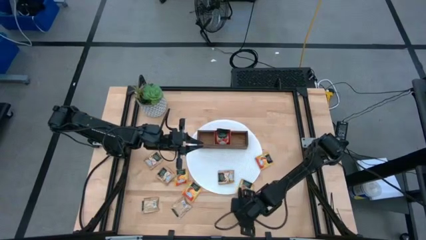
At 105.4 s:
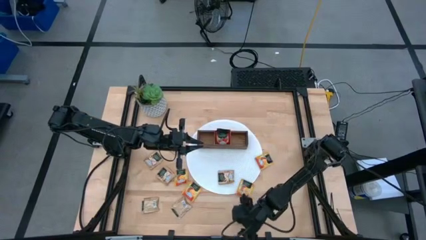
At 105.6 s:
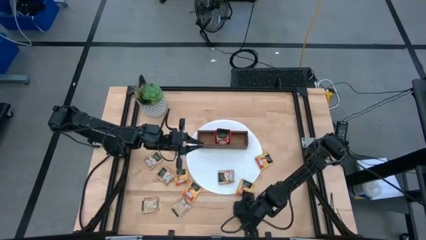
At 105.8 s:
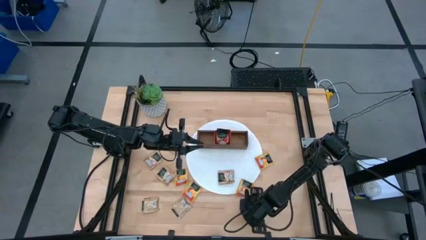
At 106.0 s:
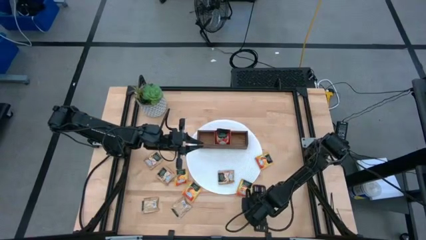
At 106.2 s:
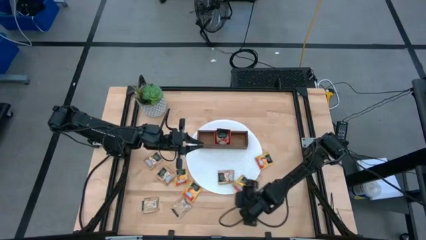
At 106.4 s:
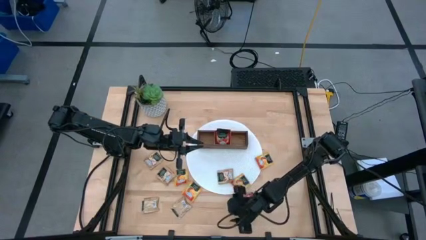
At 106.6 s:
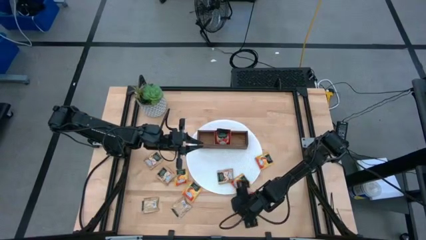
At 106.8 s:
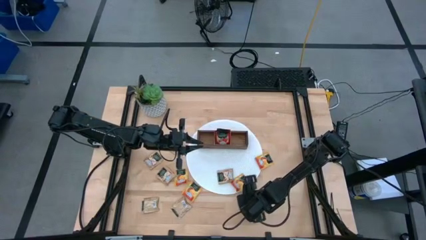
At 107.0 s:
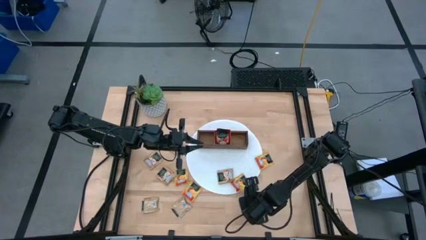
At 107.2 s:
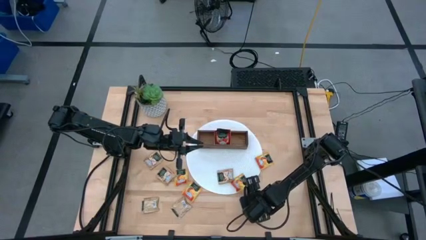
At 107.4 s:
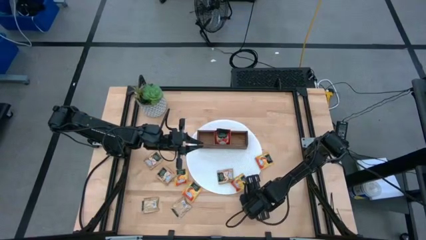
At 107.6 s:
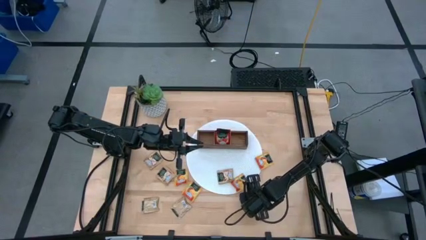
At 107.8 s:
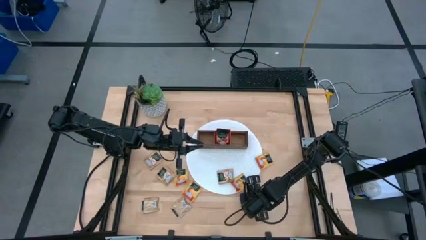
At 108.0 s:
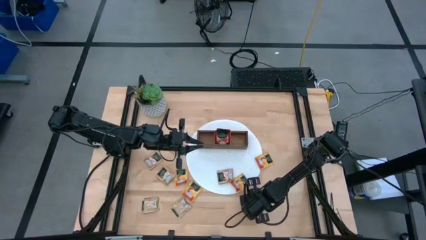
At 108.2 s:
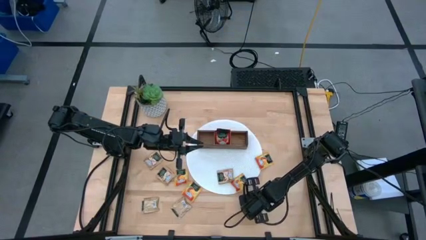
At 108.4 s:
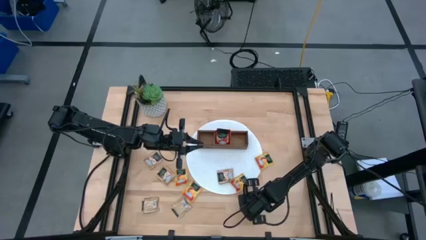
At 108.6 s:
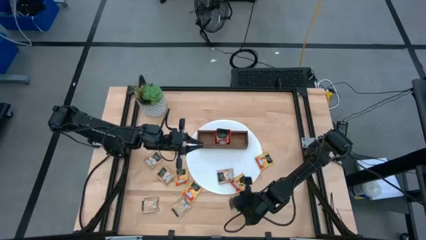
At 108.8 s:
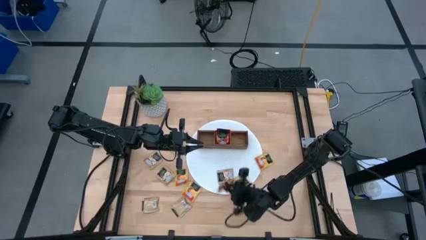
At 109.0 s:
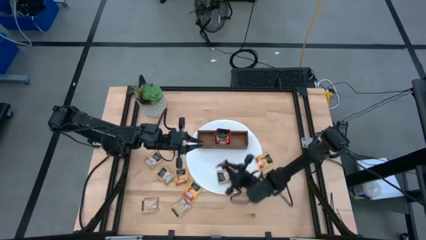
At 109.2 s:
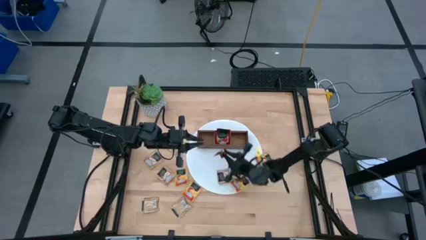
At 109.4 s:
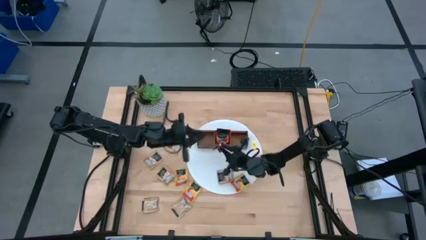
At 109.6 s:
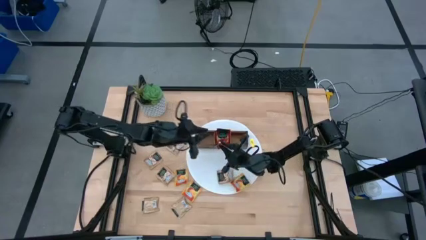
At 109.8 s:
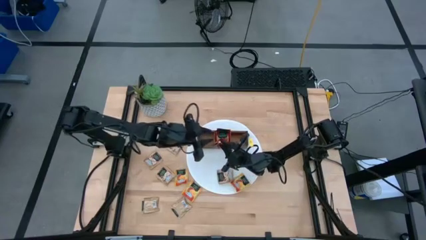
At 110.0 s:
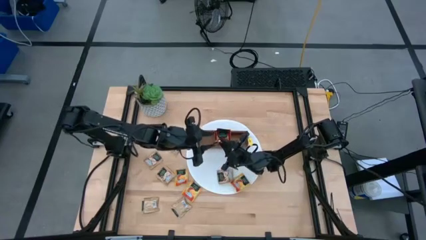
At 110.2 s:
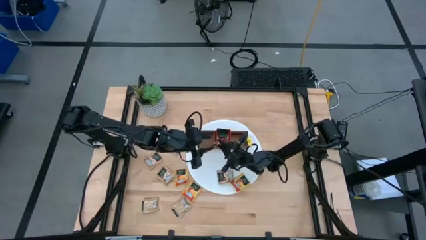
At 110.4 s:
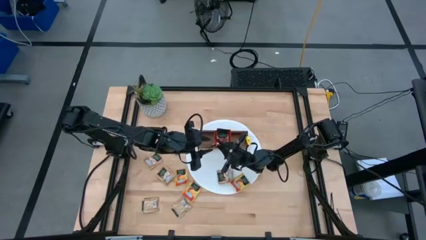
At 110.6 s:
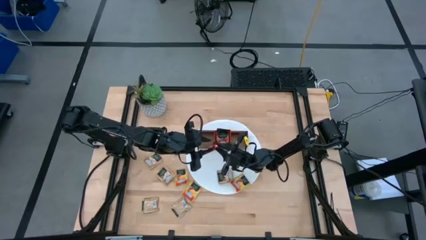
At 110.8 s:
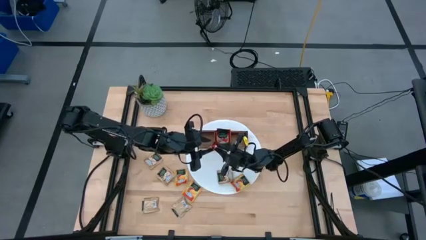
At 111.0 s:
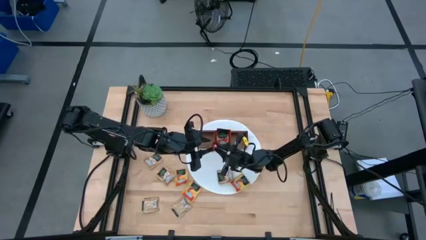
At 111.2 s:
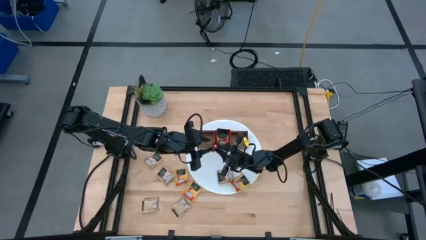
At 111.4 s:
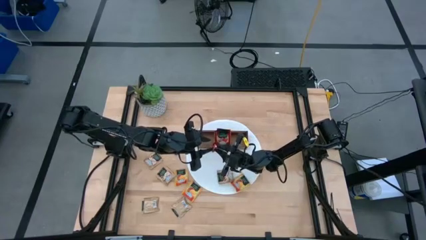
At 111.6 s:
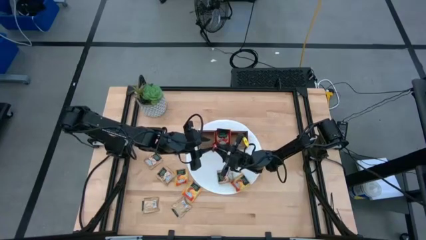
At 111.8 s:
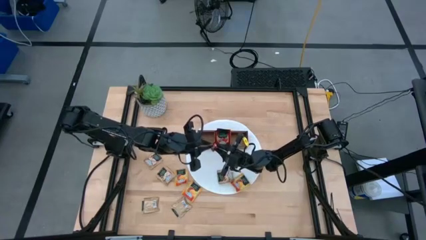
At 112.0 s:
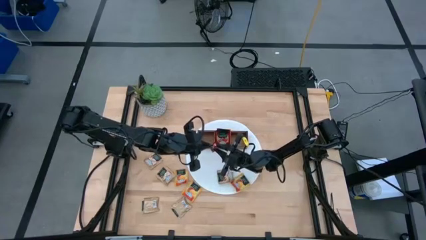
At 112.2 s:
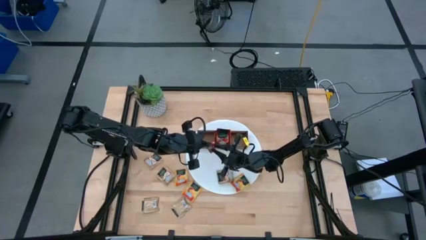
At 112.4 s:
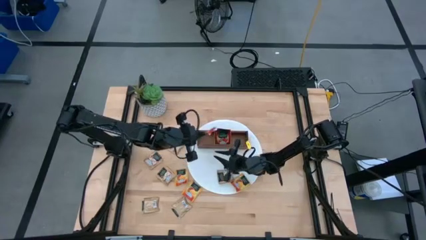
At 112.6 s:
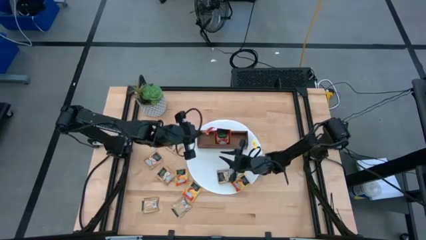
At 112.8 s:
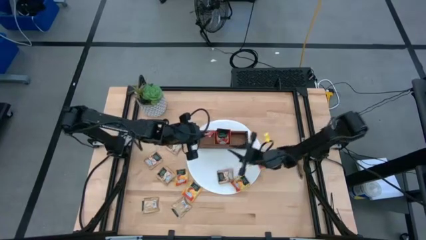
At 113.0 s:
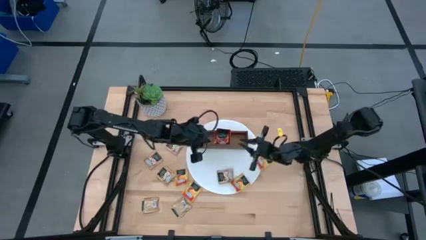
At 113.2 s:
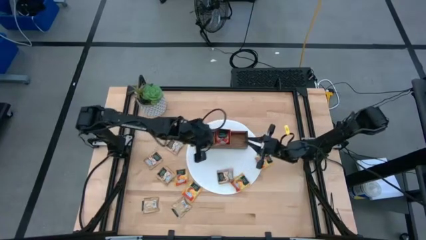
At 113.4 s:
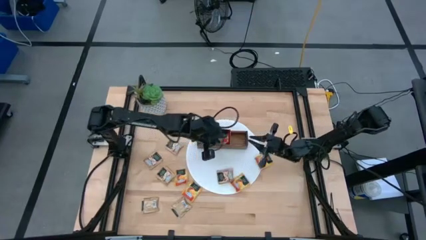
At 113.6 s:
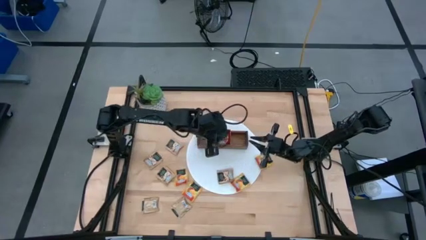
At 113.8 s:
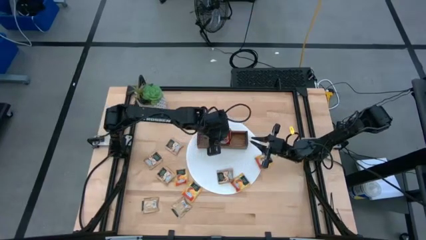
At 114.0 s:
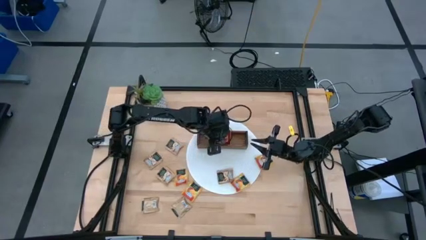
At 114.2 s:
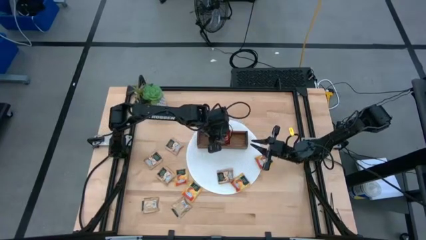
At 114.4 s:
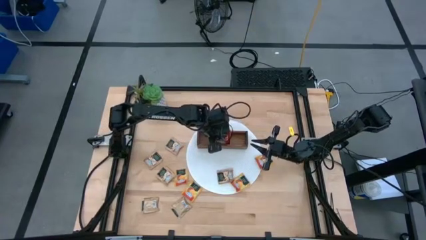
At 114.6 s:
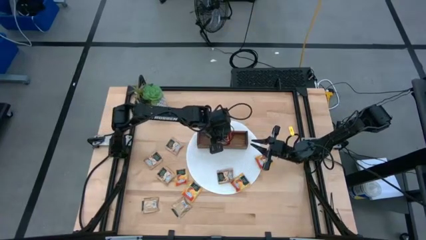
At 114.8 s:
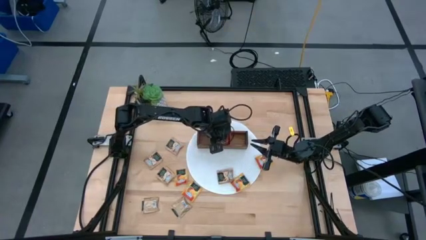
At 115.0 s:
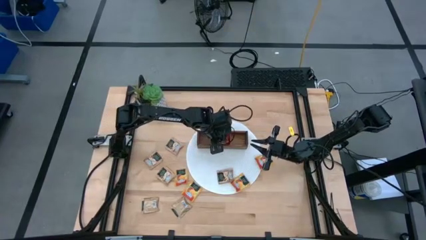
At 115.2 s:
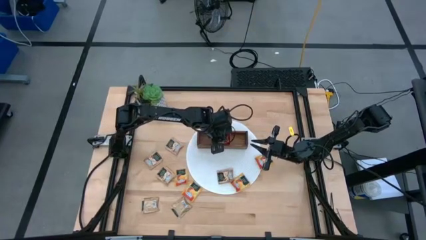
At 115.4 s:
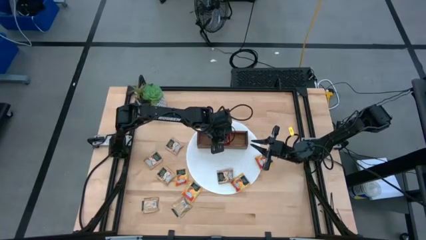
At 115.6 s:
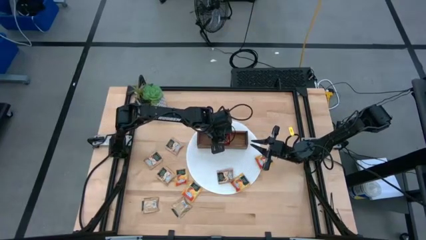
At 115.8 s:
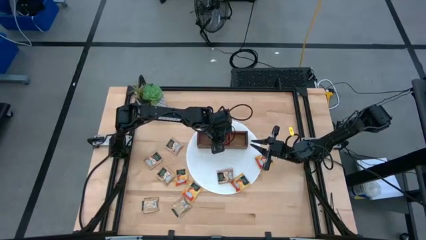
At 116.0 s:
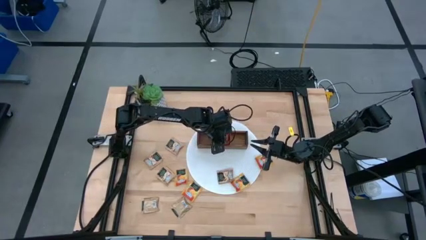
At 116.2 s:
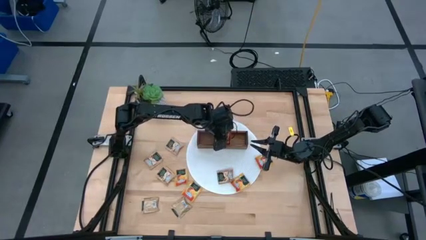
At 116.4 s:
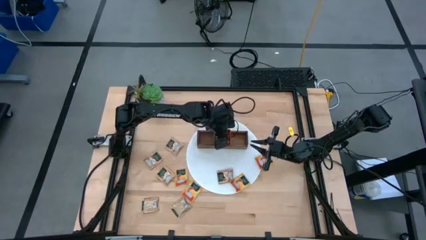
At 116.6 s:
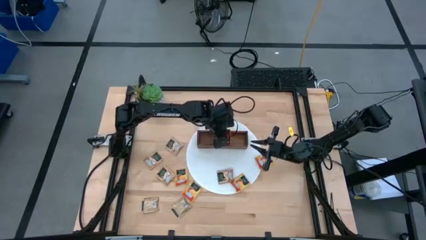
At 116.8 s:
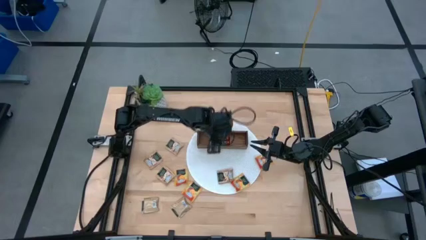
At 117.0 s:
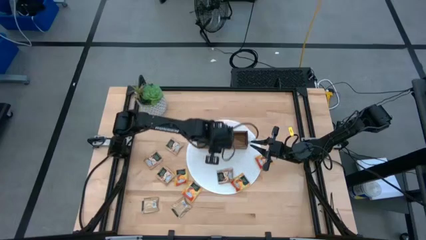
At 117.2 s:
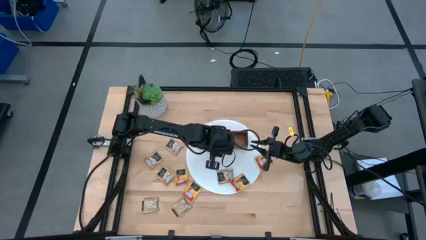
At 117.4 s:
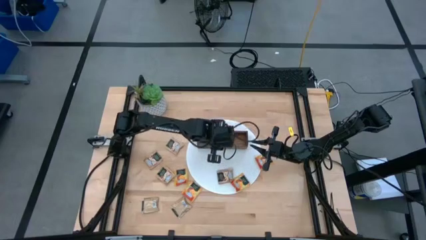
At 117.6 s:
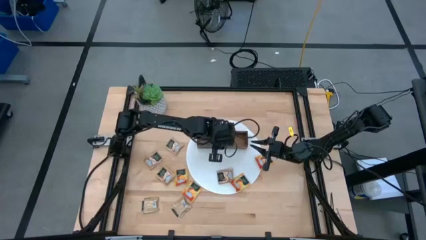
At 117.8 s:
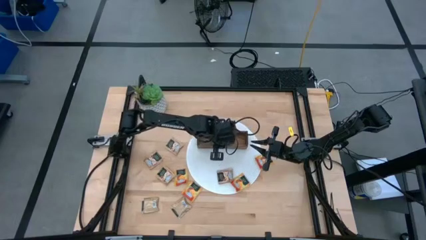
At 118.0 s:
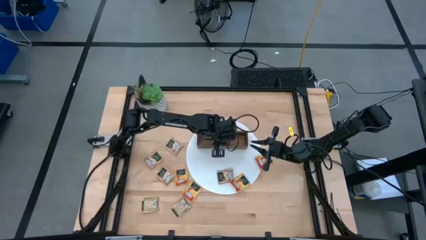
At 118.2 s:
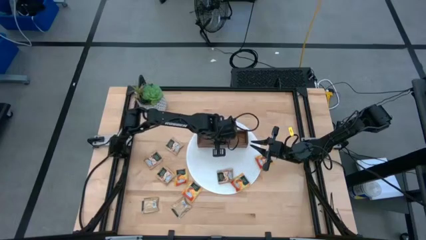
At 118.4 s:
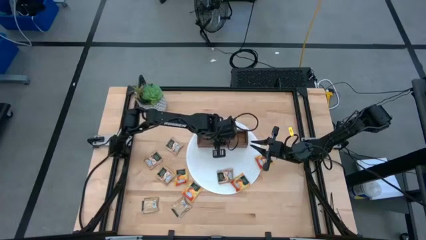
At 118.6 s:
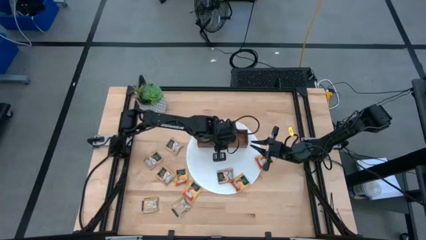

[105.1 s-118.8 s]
Task: Pick & Place Tea
Put the red tea bag into the middle section of the wooden organizer
